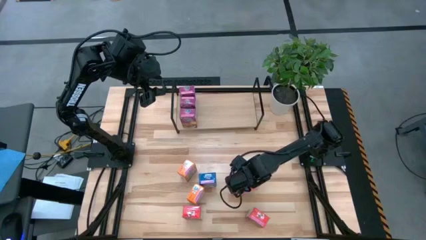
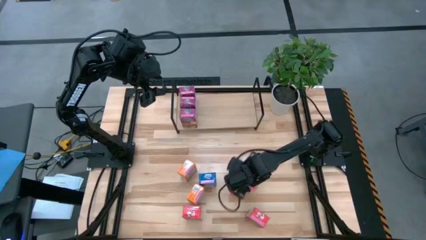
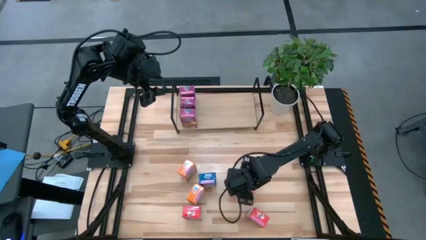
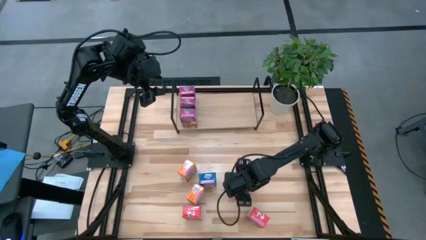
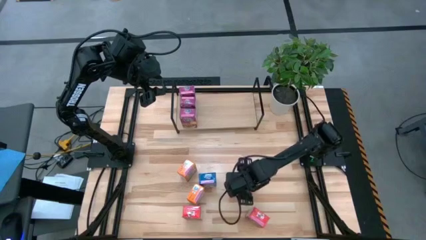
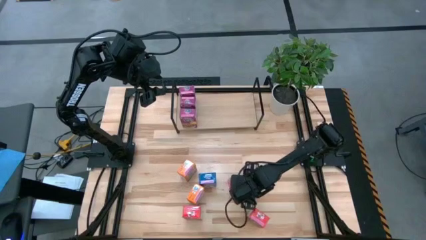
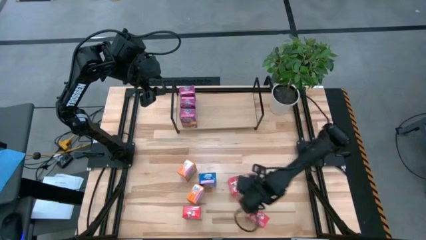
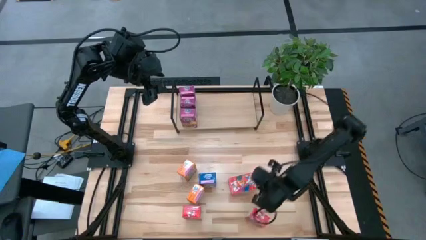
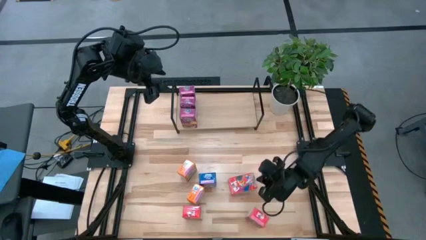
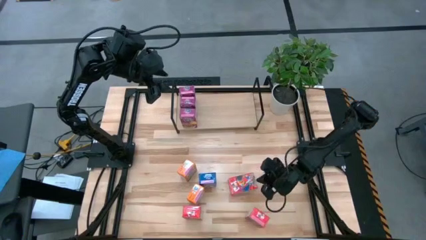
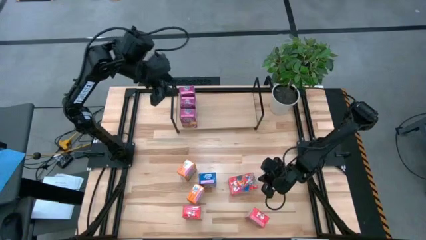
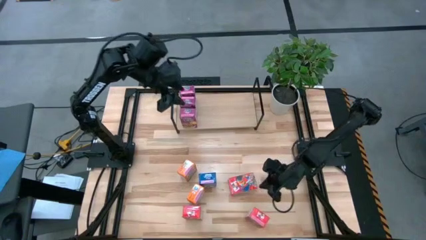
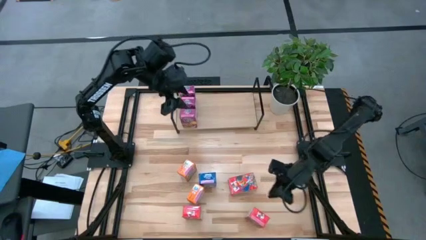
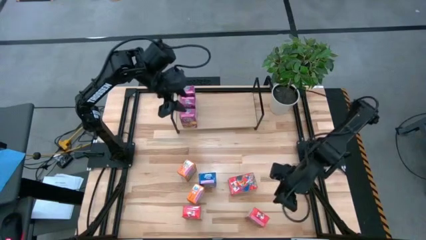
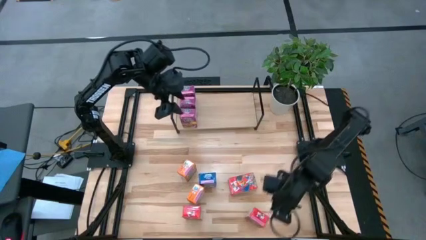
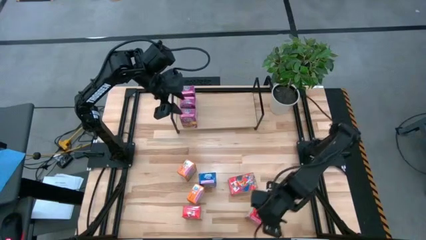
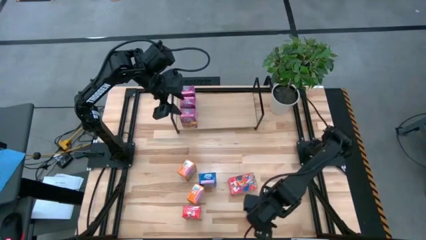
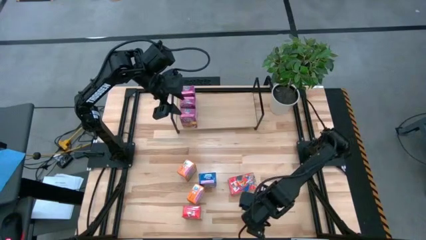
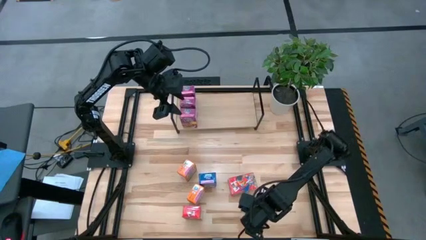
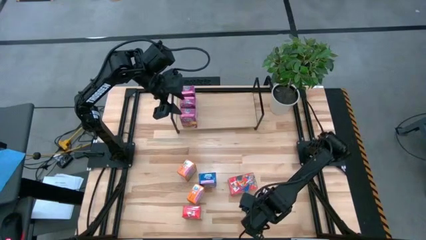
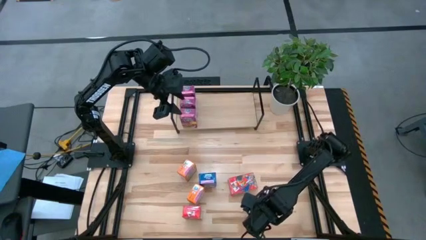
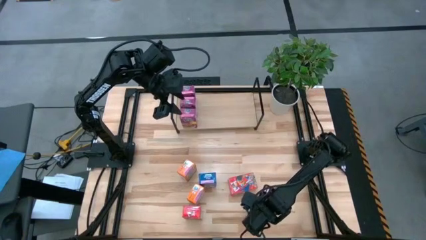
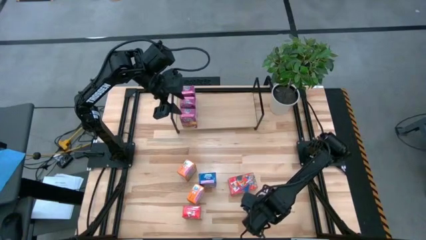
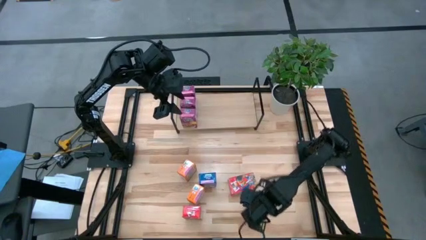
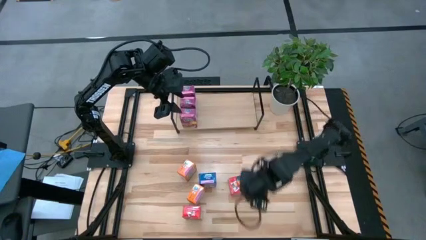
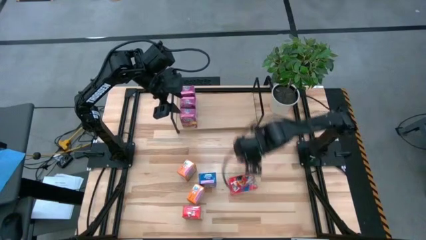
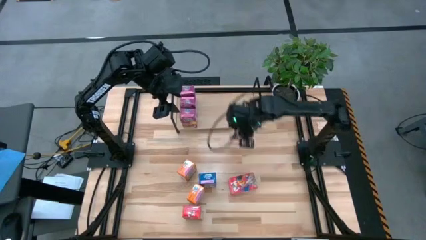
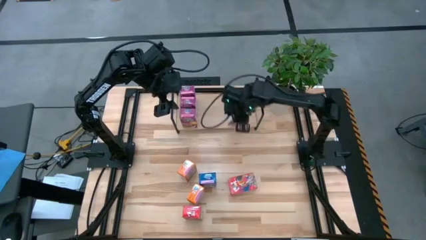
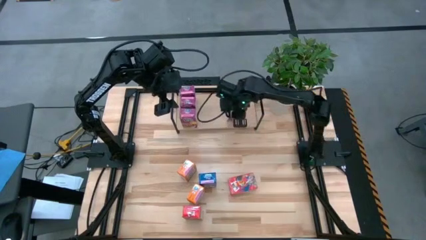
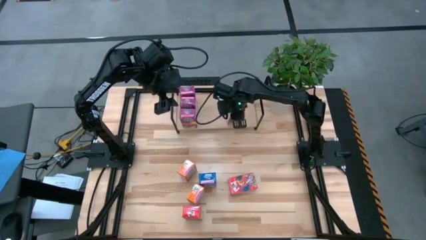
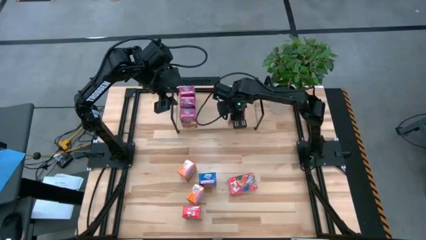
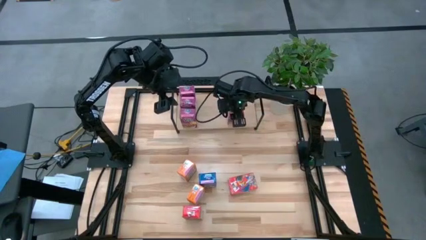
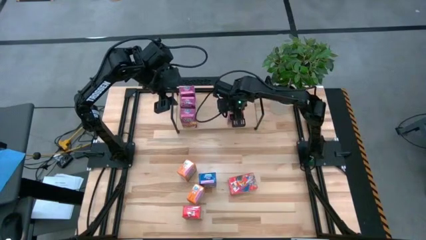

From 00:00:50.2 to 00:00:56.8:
Task: Stack cereal on shelf
Put the bottom right red cereal box on the shelf

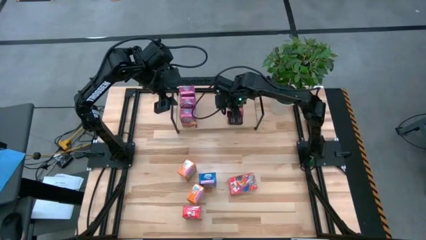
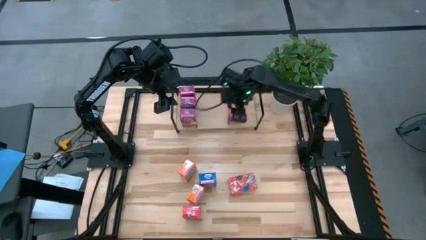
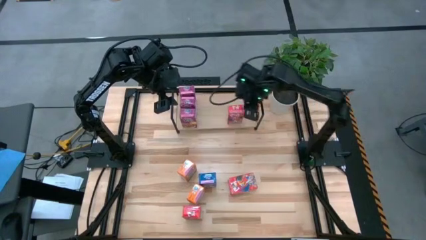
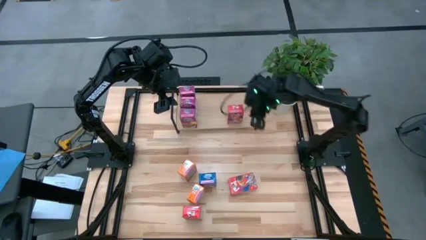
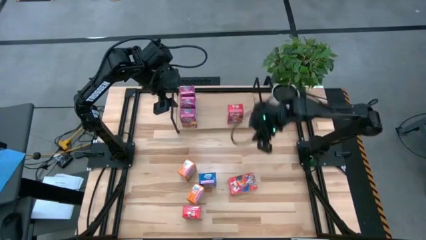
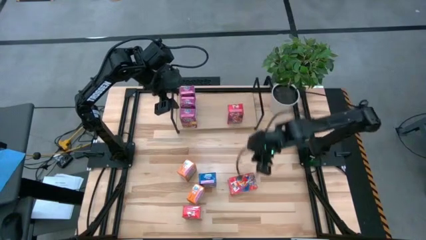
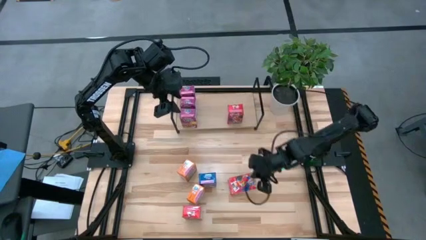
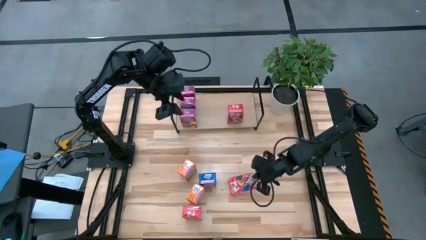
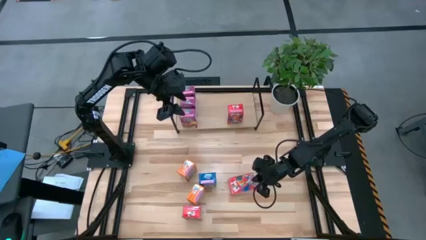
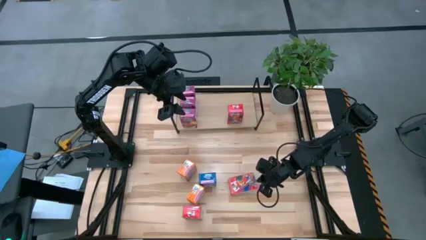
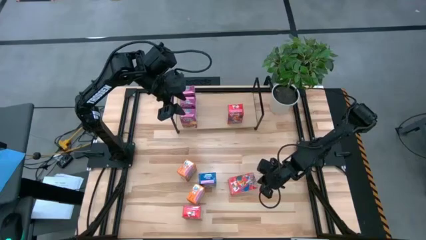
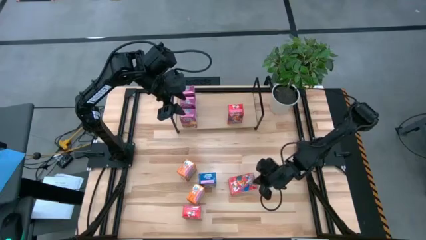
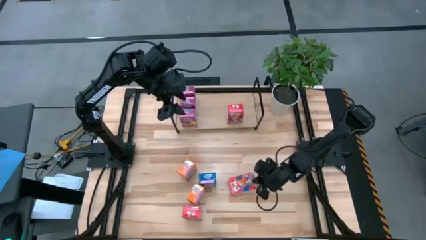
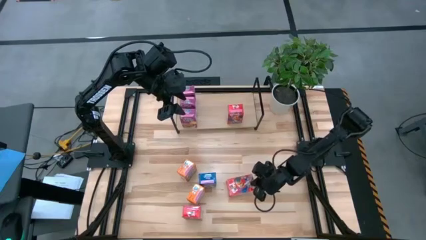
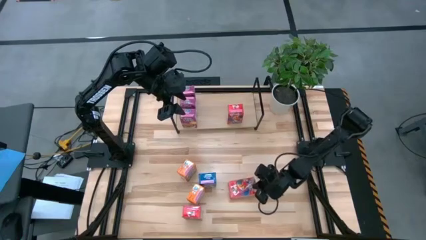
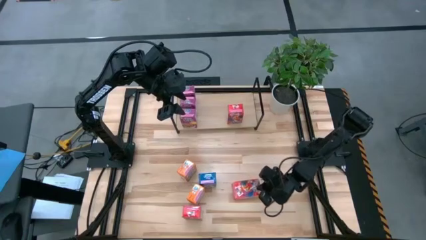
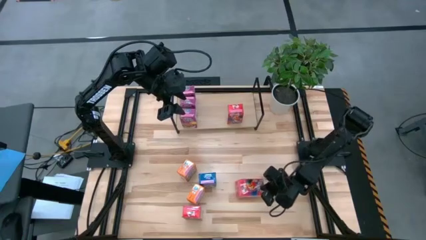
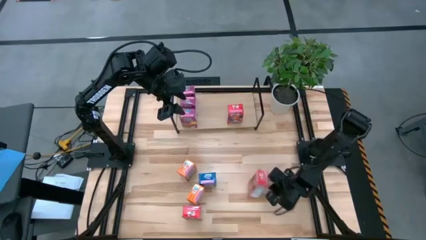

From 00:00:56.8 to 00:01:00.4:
Put the top red cereal box on the shelf aligned with the other red cereal box
